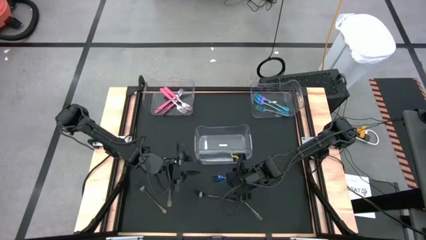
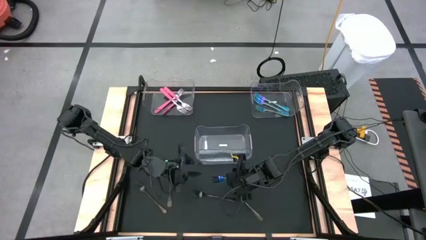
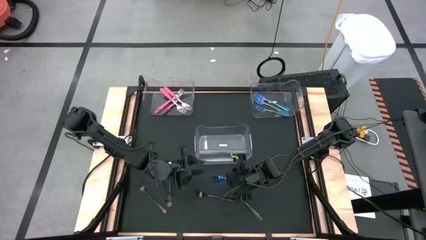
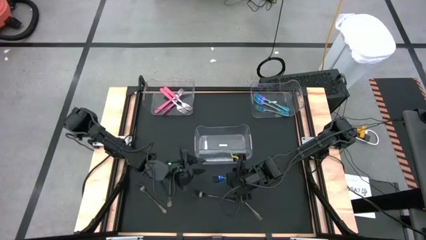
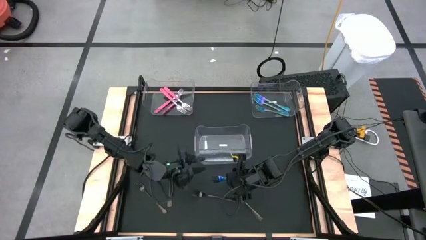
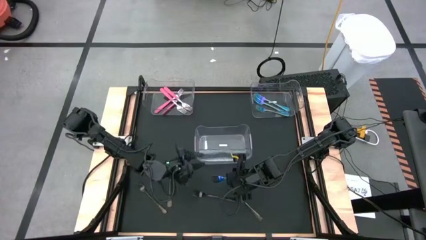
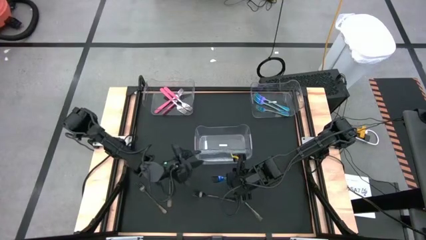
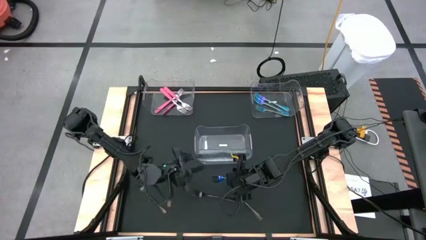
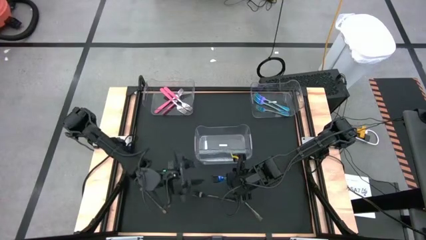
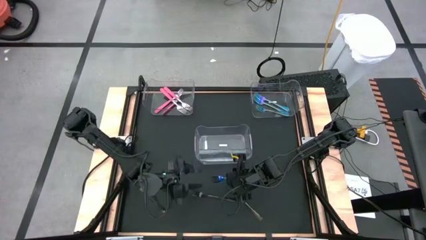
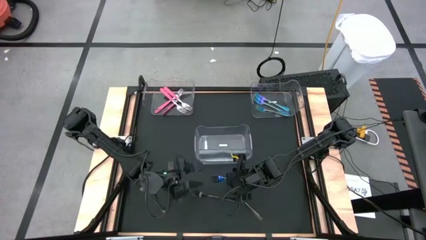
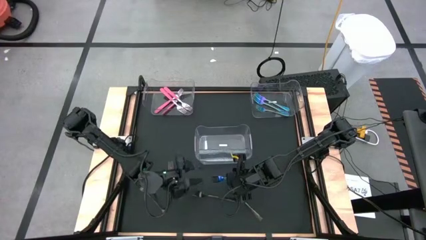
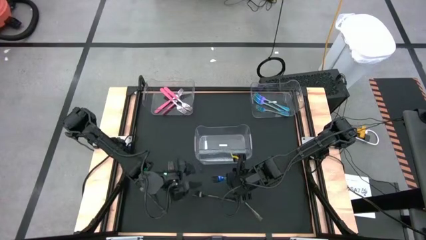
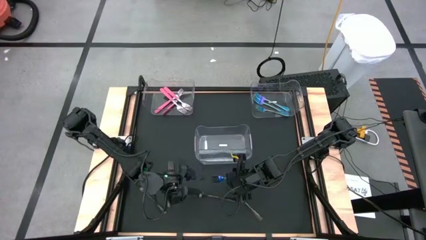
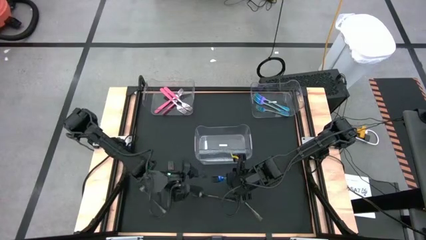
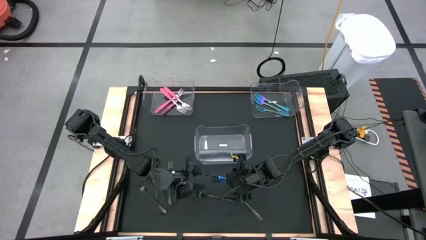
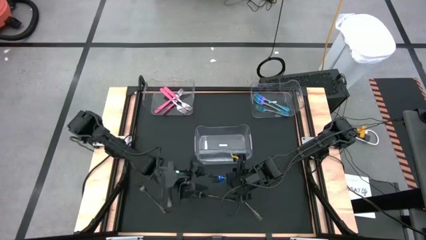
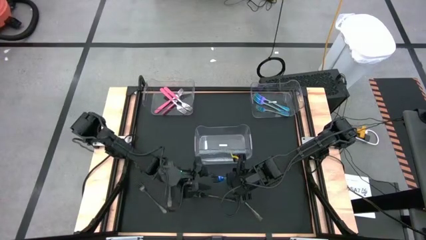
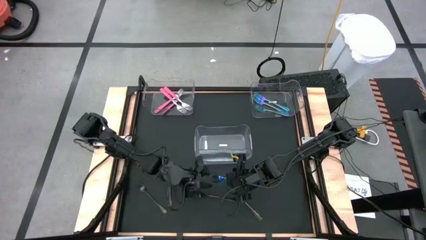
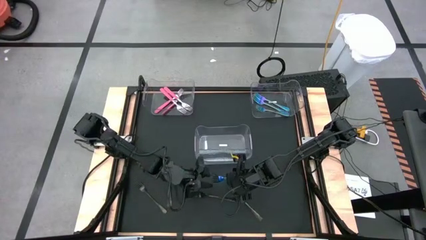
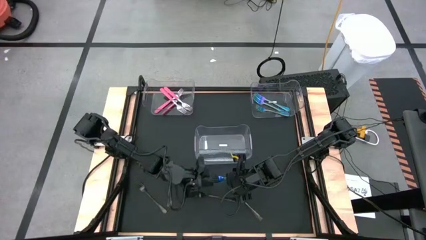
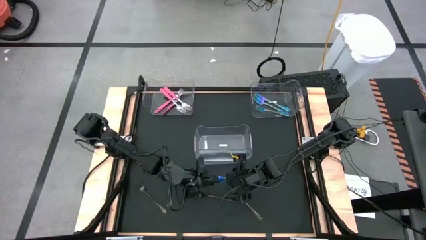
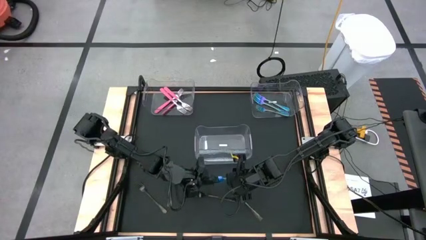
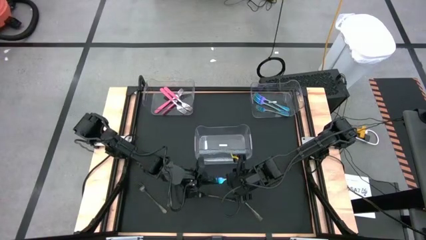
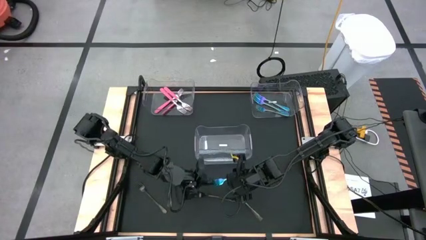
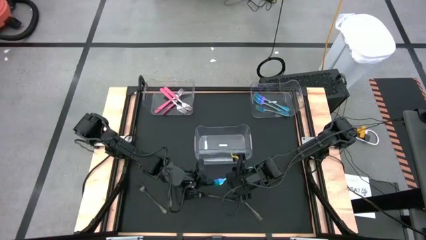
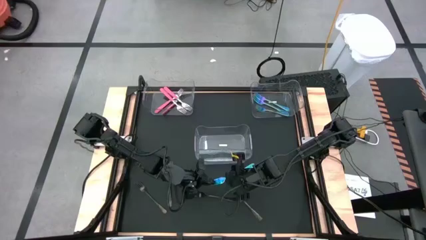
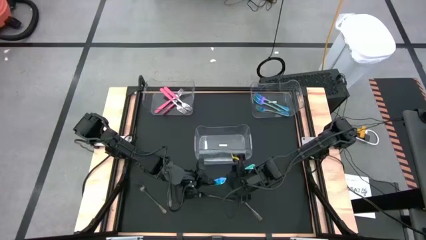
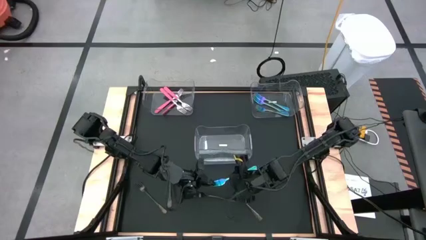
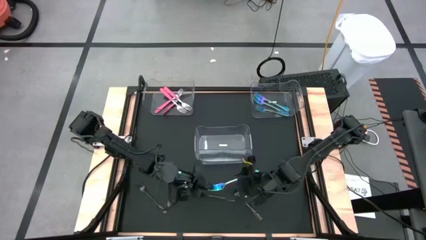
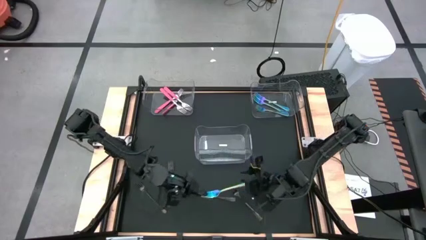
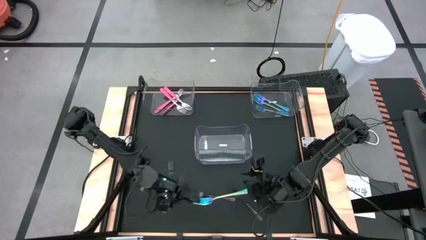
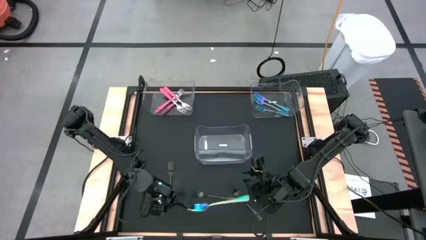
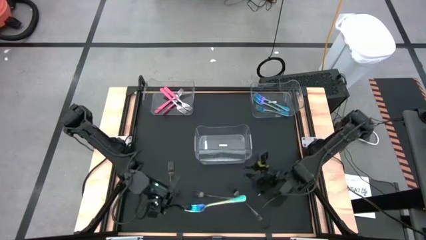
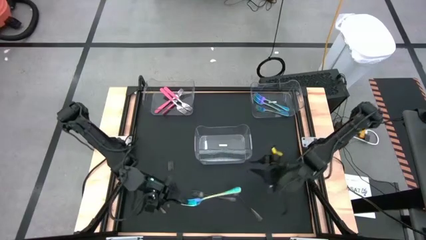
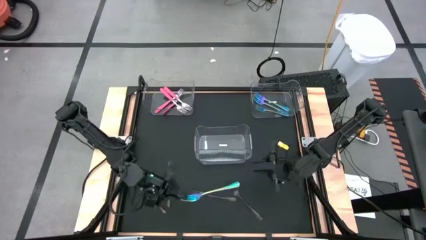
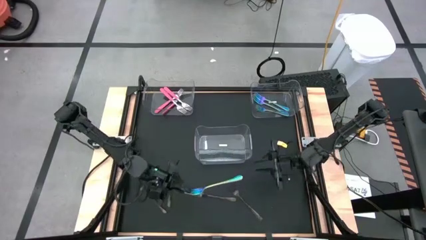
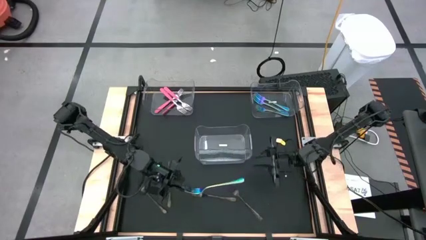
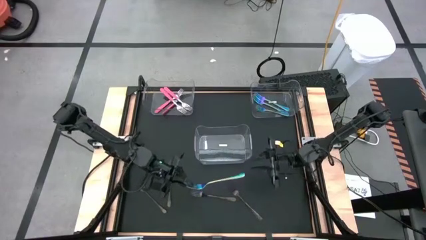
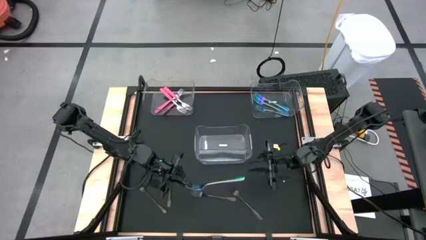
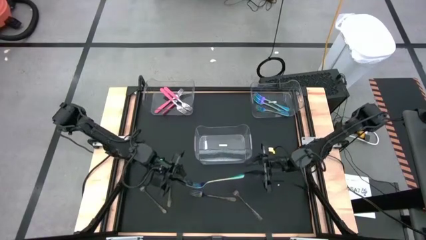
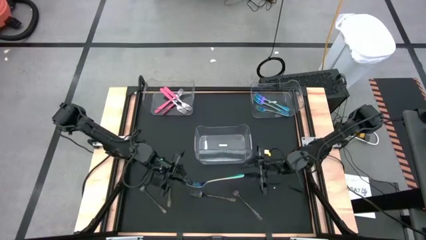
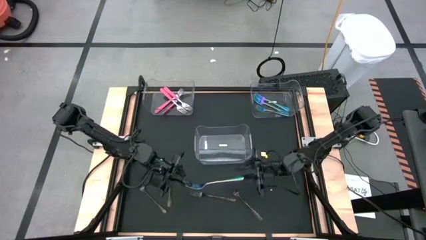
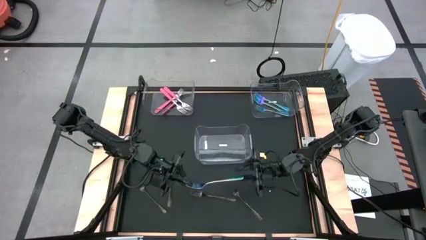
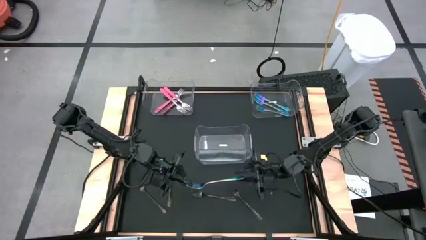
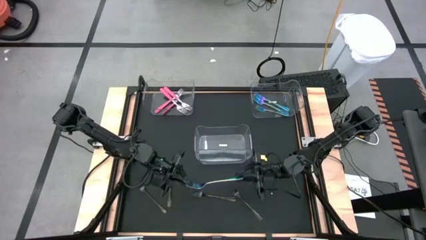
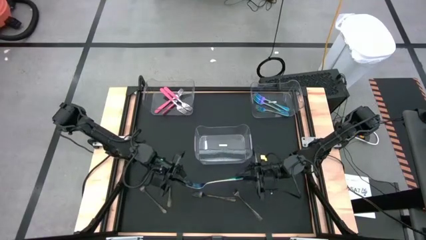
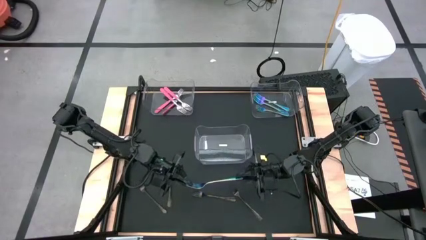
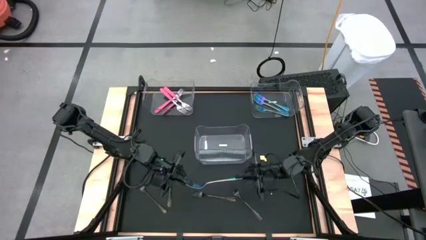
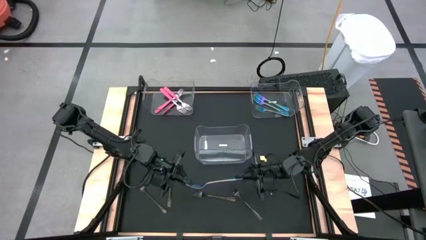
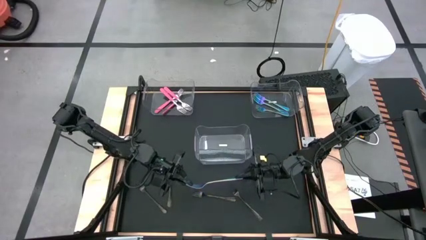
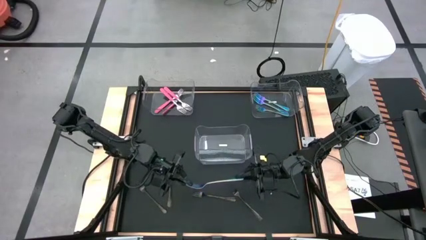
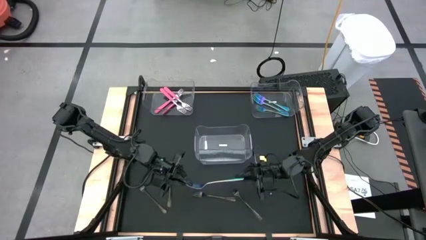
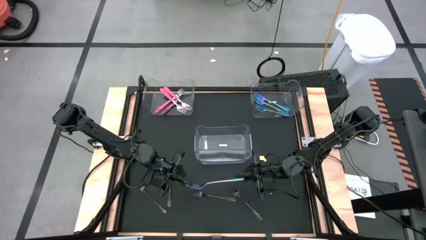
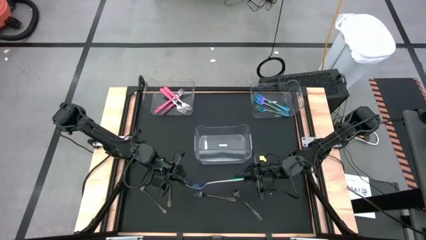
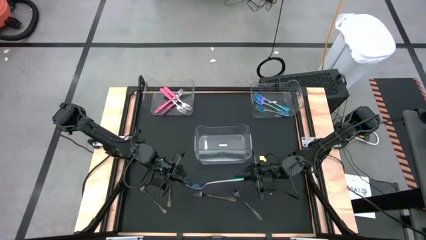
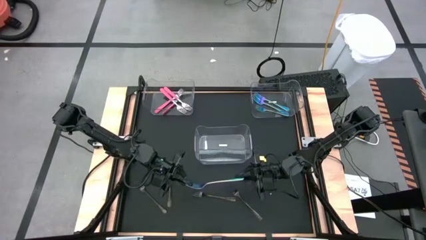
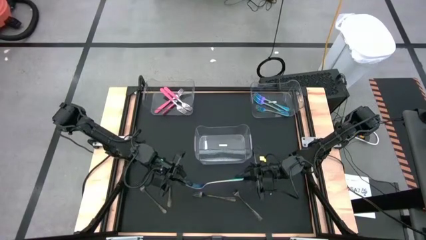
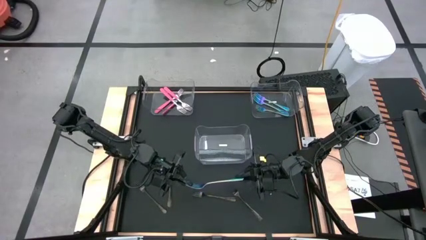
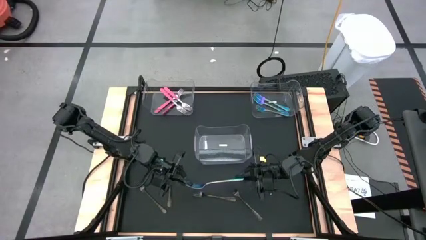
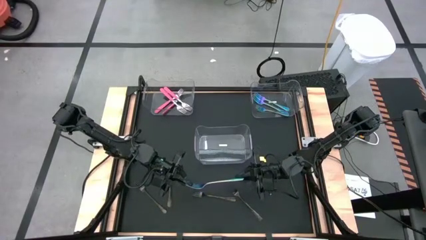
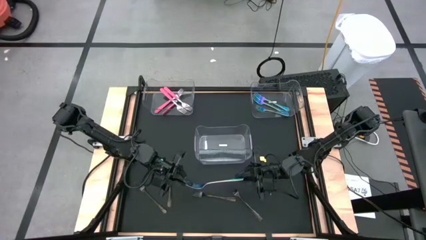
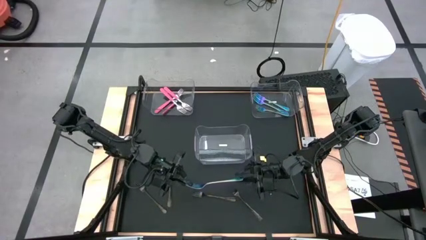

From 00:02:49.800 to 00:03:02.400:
Task: Sort silverware by color (type)
Put the blue fork into the right transparent bin

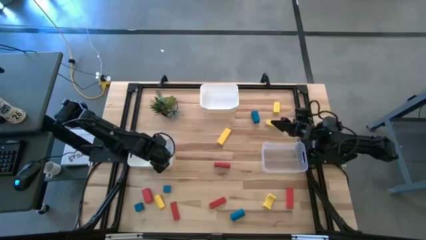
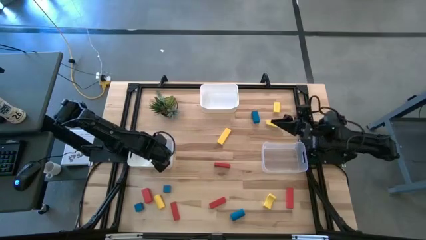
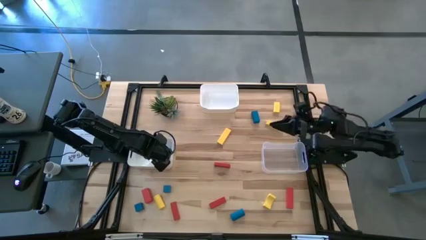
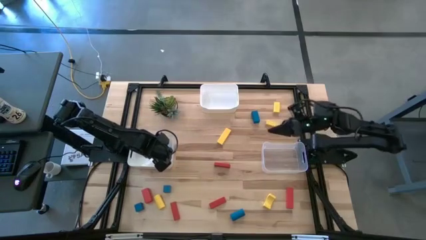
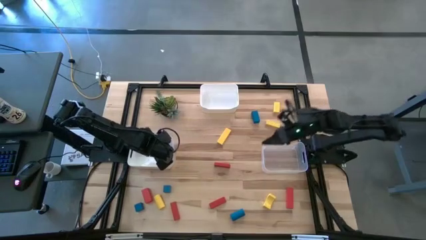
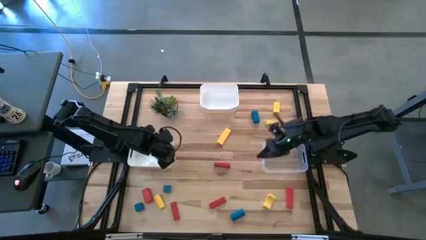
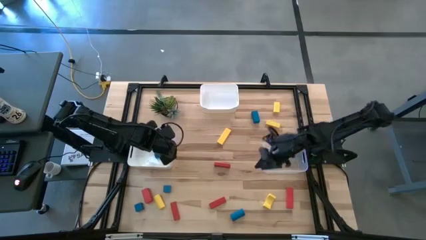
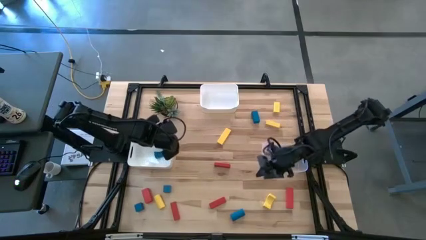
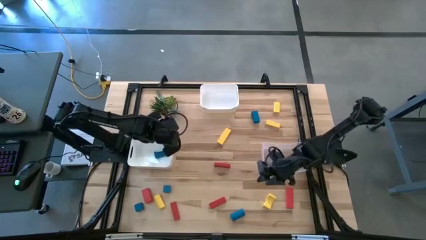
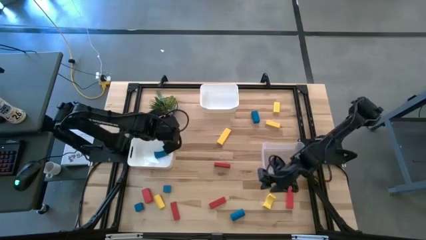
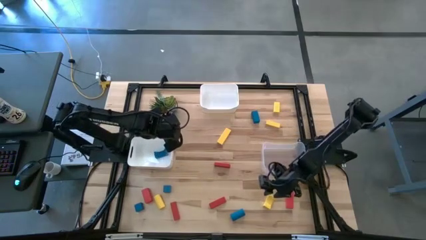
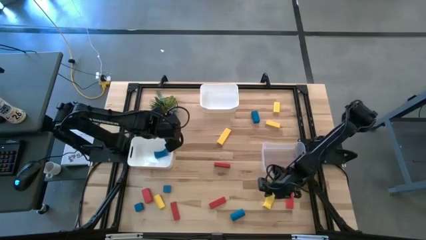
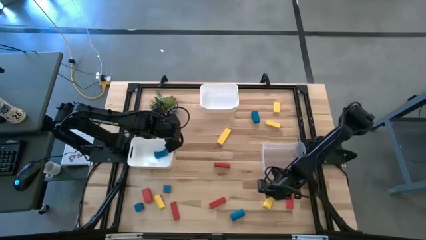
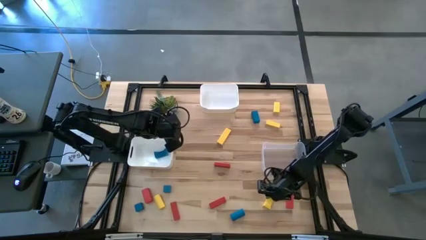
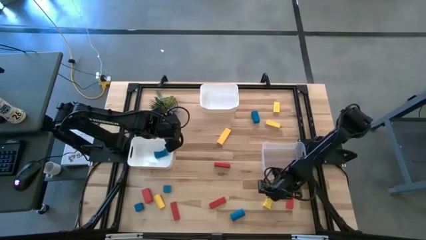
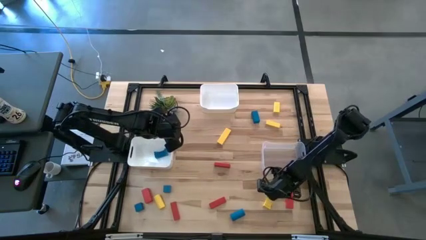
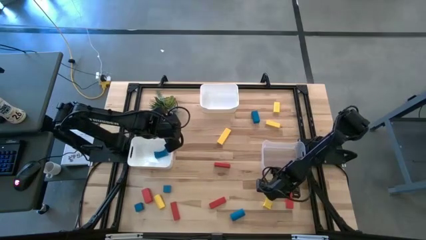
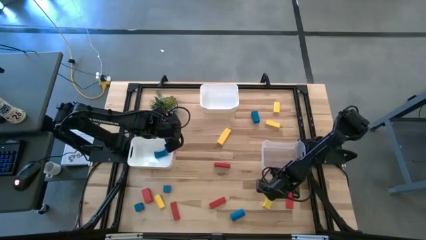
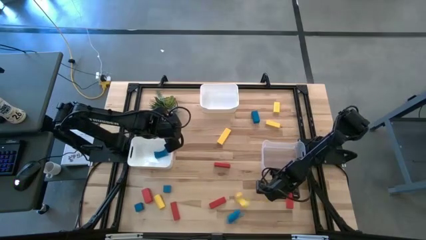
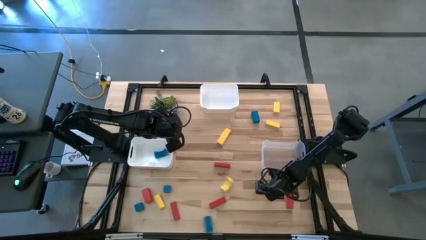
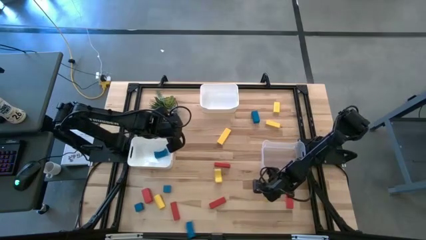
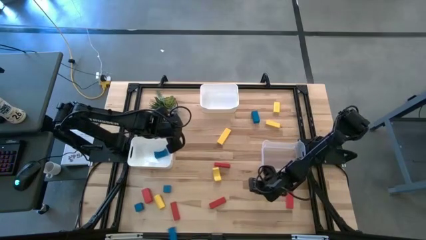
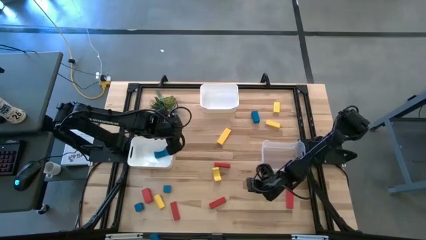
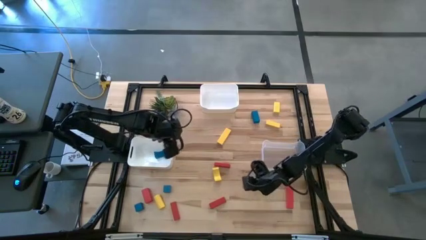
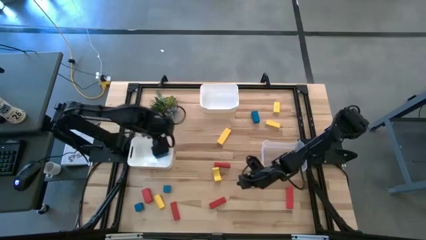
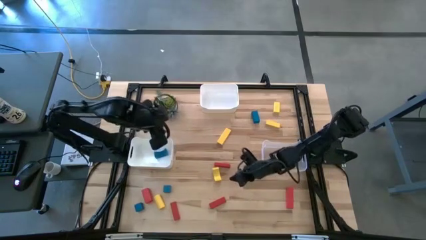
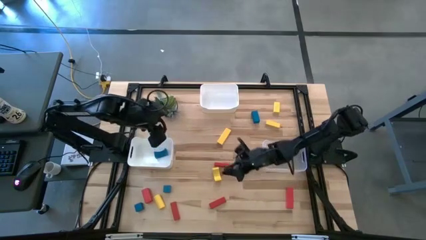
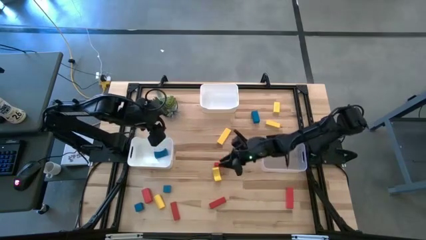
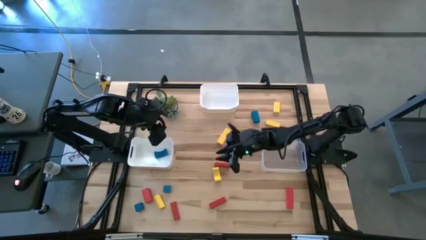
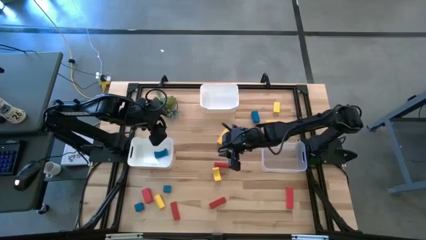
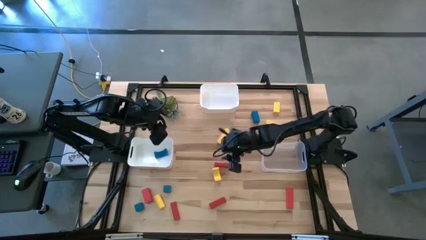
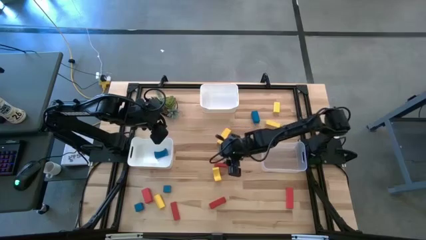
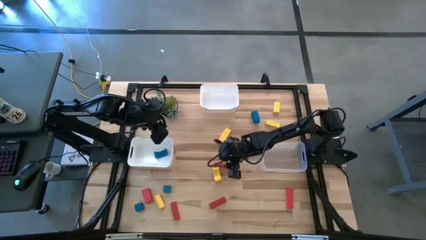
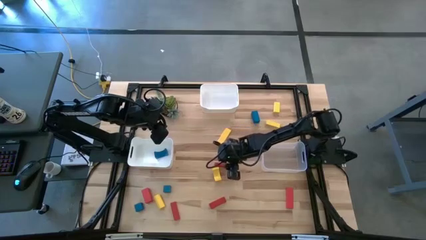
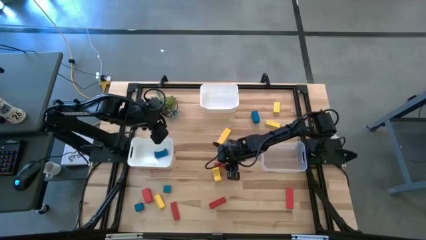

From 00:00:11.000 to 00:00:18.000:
Task: Sort & place blocks by color
Put the bottom right yellow block into top white the bin
